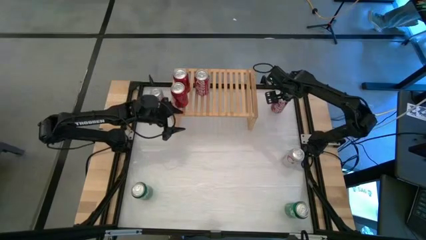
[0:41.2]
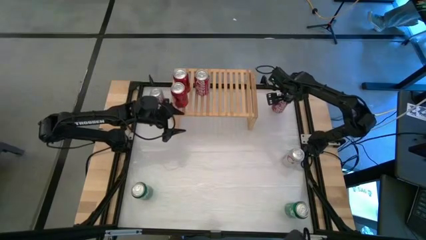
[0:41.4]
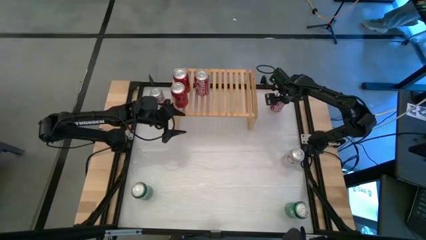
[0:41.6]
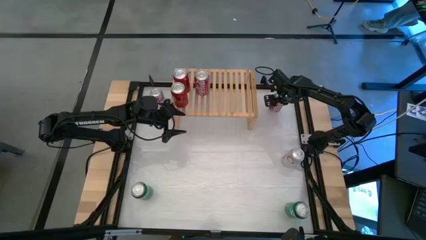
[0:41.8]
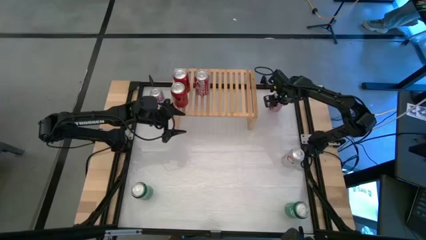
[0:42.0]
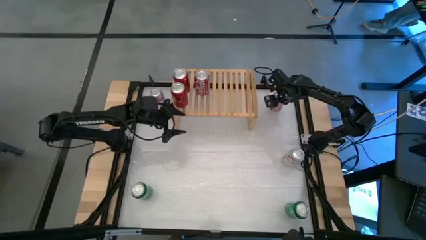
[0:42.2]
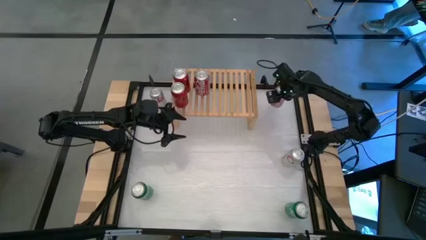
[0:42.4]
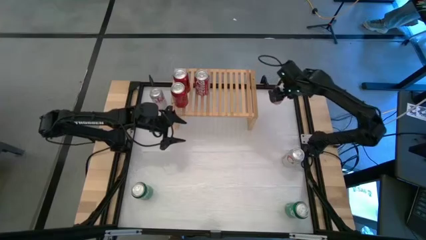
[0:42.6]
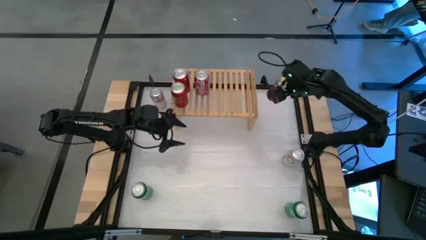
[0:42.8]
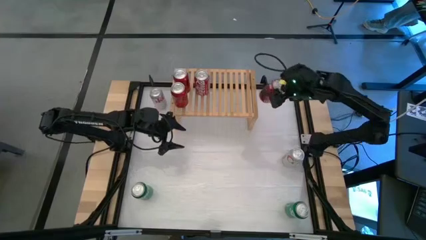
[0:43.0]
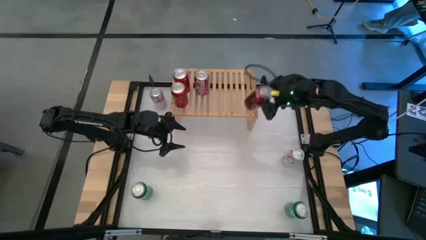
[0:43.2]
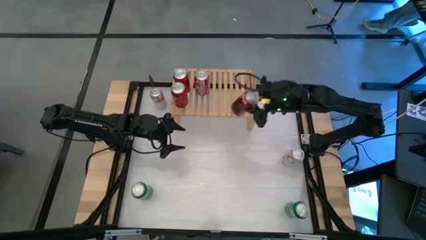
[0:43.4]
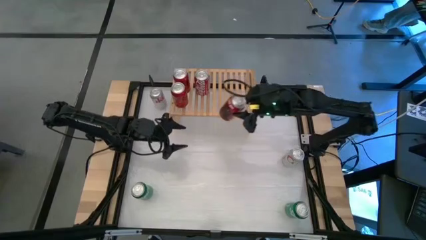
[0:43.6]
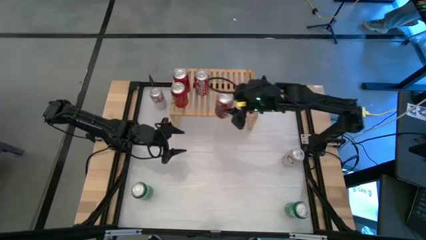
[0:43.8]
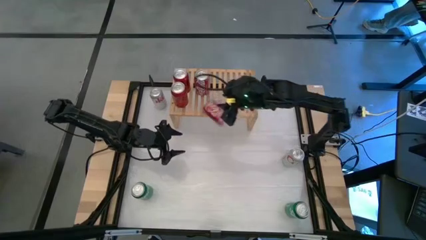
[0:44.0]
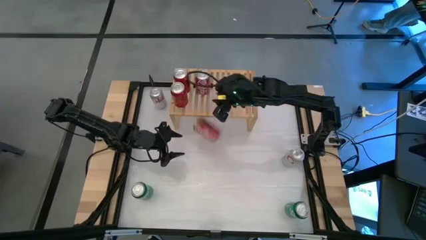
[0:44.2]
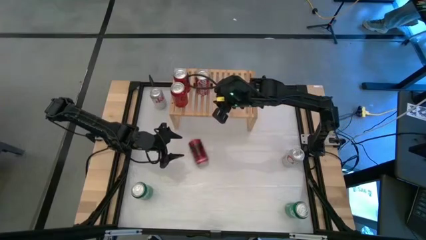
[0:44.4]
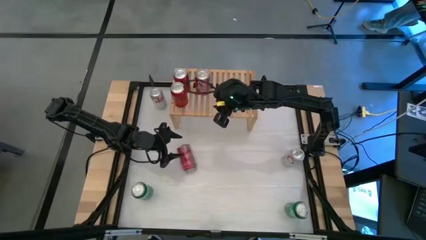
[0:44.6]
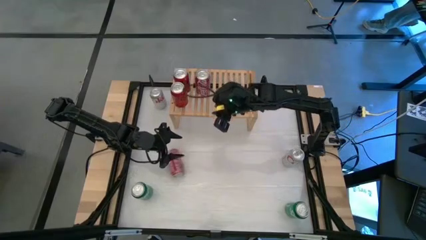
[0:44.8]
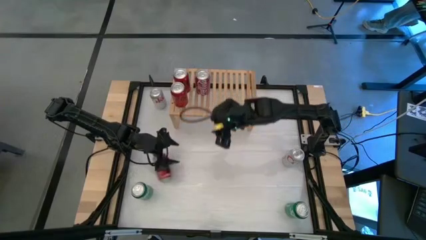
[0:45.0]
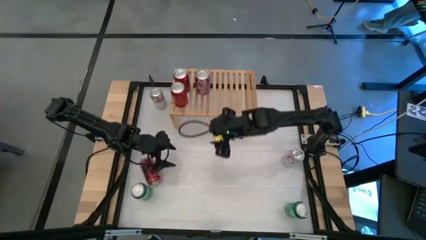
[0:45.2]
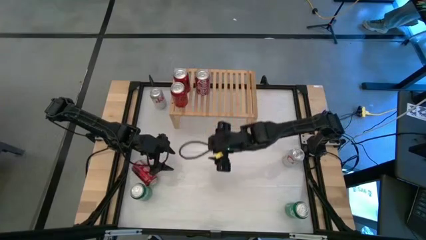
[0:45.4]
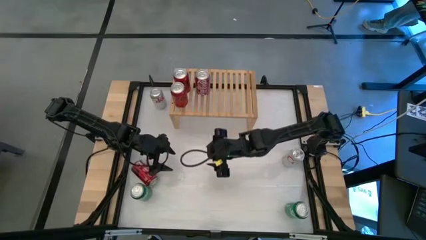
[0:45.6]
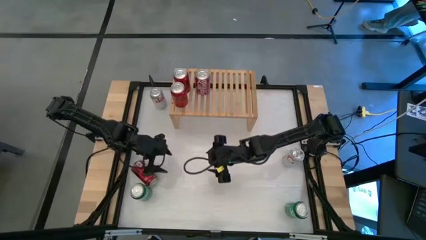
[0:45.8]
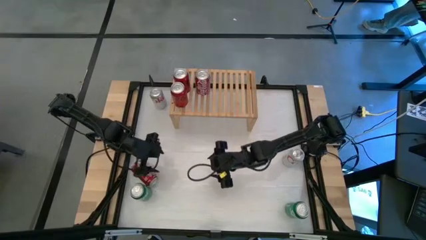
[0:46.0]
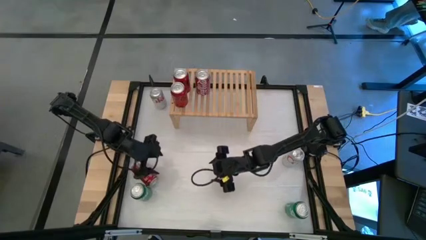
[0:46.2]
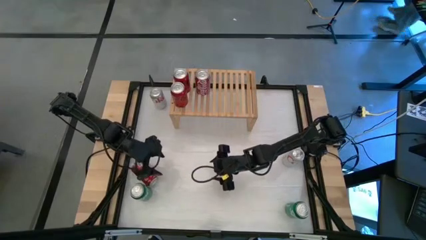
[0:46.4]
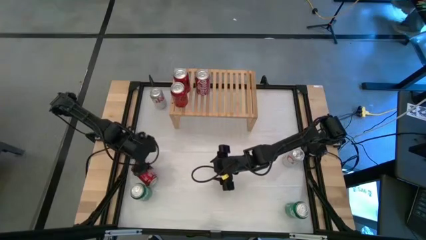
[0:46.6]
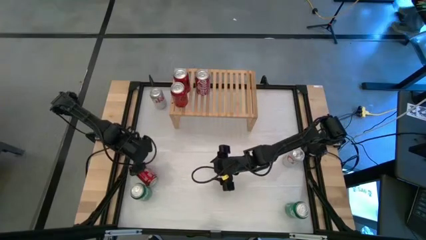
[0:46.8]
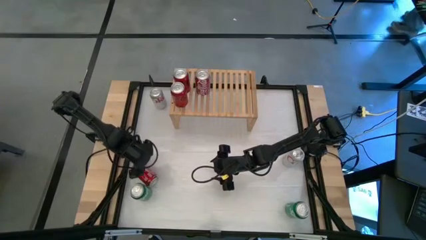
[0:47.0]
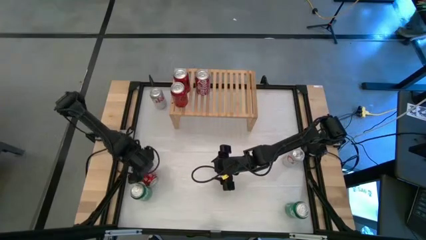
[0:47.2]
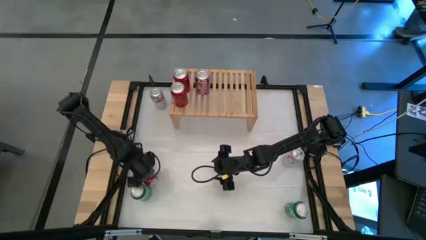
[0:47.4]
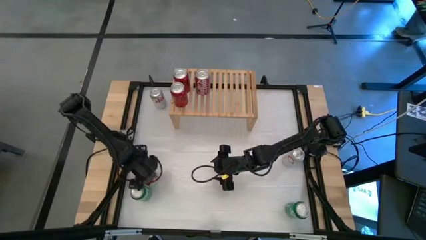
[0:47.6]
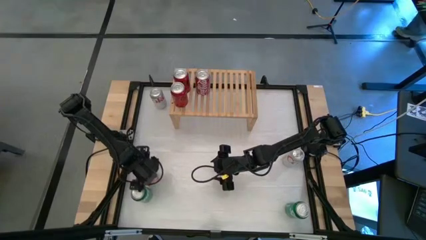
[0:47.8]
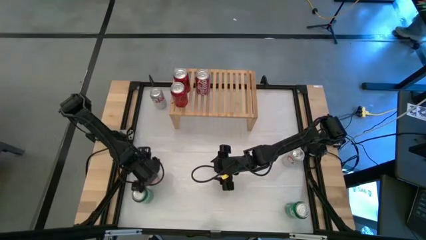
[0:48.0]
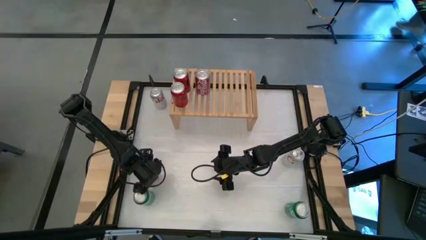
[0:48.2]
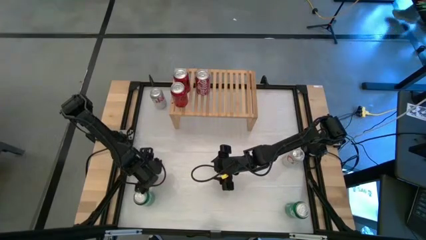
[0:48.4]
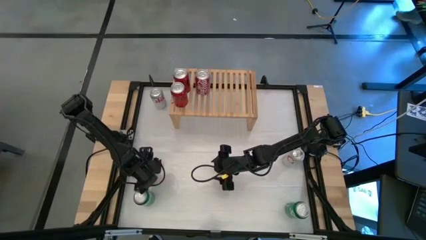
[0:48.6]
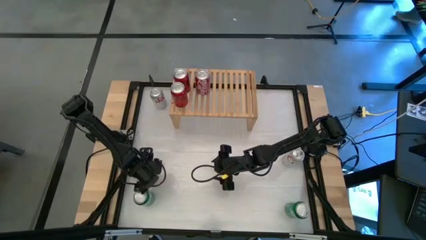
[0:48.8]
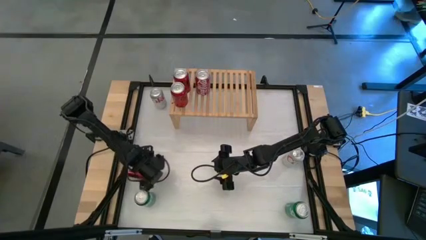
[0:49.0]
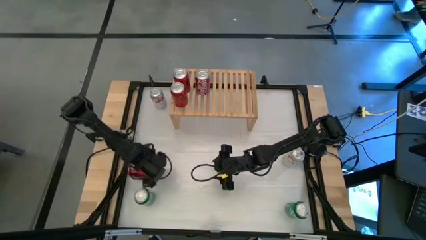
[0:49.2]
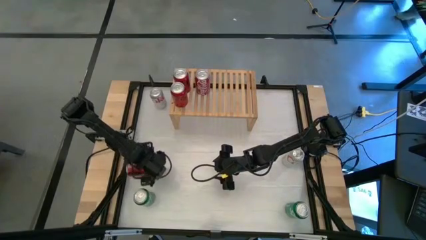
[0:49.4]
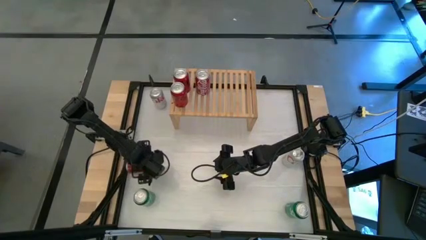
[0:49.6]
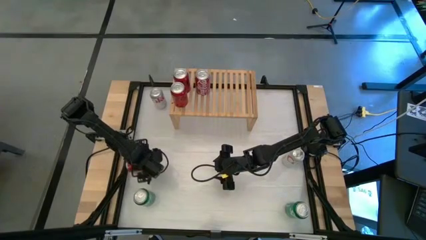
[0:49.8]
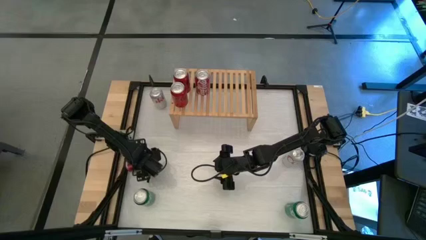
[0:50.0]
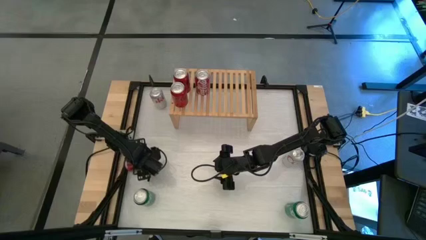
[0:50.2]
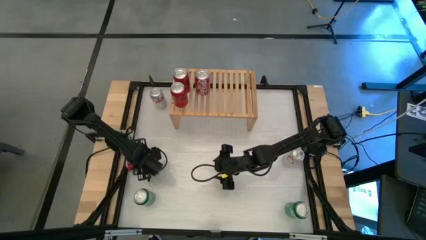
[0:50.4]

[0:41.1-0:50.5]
Task: Place canned beverage on shelf
Put the red and white soda can on the shelf aligned with the other red and white soda can
